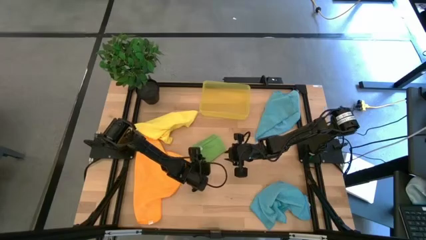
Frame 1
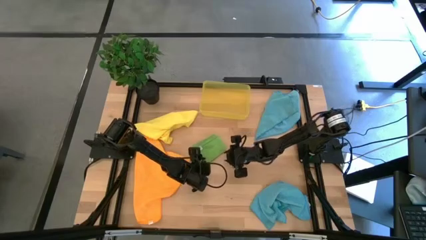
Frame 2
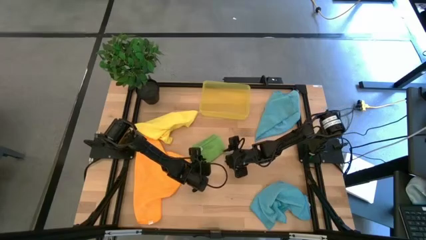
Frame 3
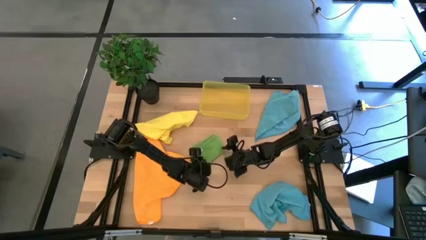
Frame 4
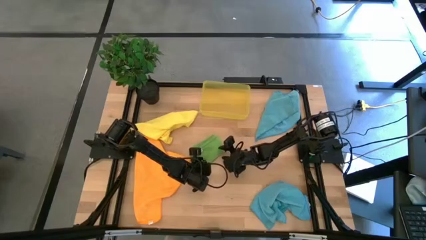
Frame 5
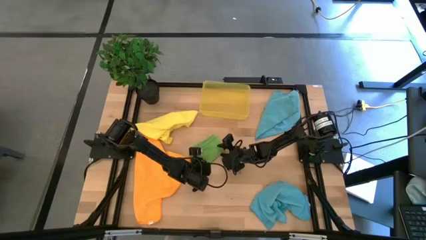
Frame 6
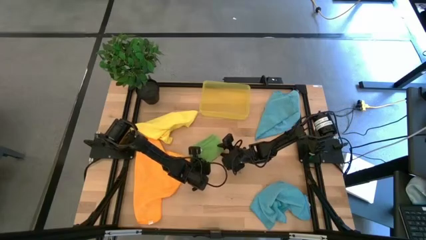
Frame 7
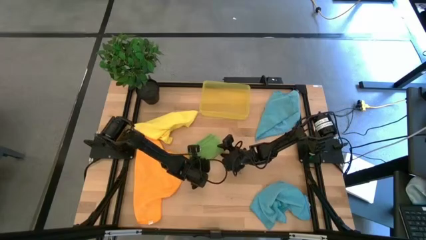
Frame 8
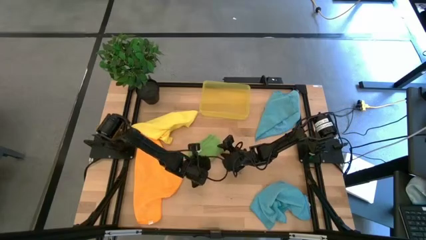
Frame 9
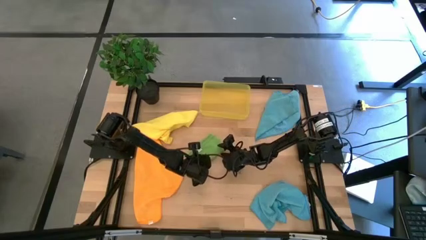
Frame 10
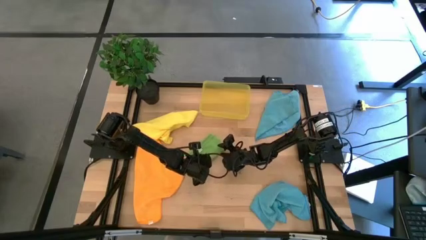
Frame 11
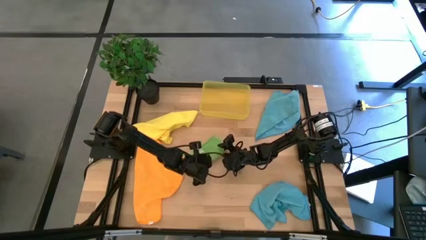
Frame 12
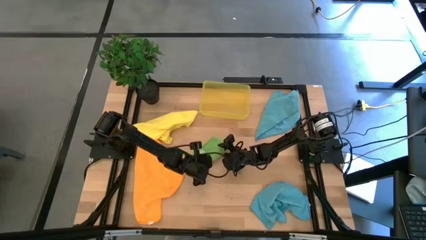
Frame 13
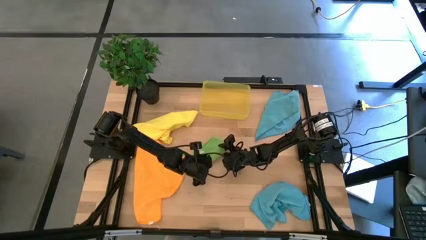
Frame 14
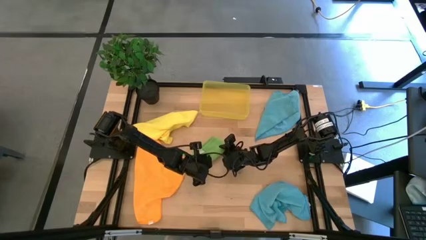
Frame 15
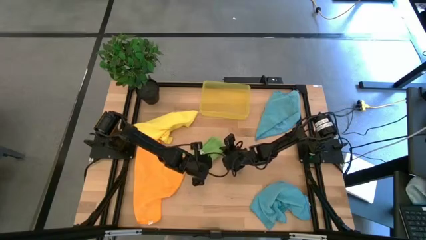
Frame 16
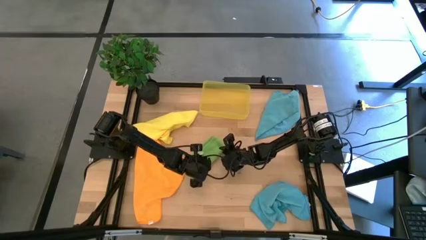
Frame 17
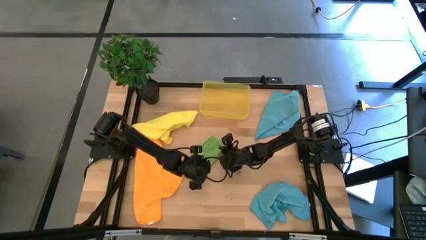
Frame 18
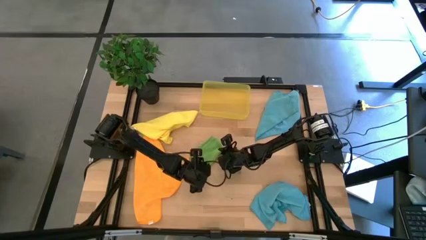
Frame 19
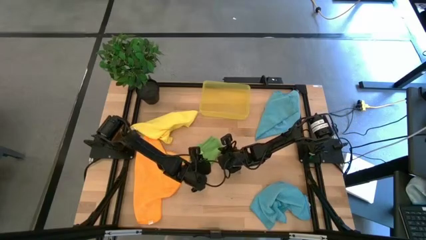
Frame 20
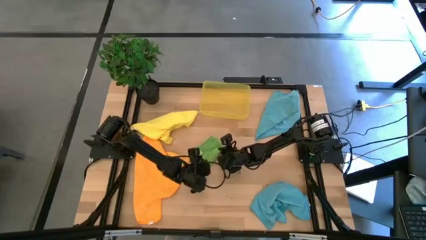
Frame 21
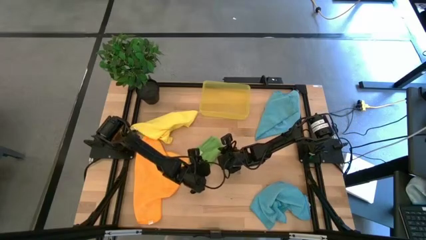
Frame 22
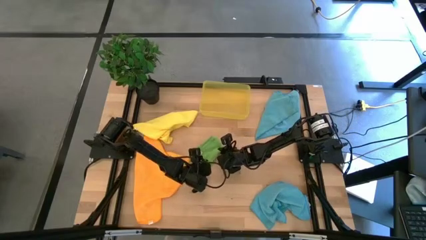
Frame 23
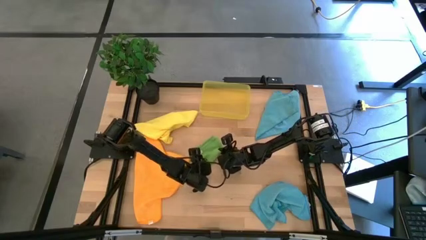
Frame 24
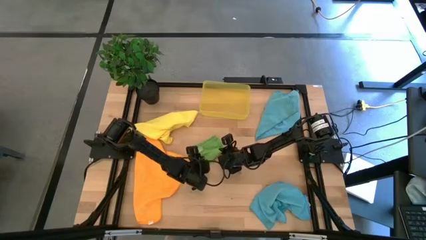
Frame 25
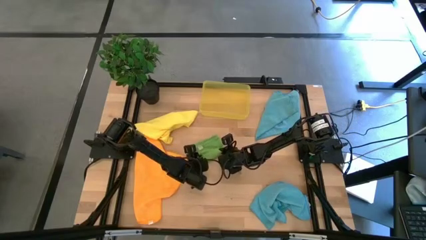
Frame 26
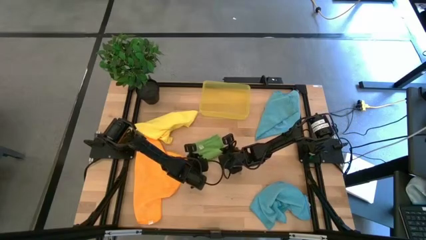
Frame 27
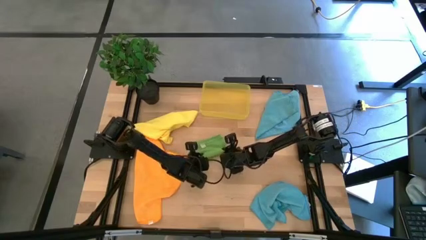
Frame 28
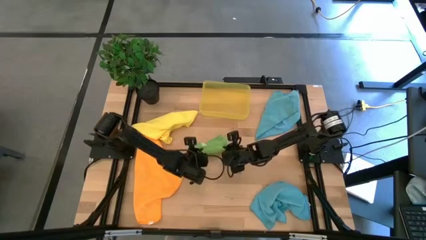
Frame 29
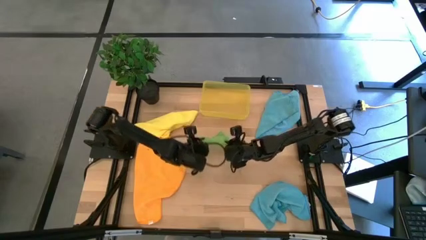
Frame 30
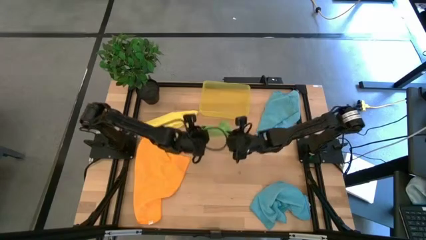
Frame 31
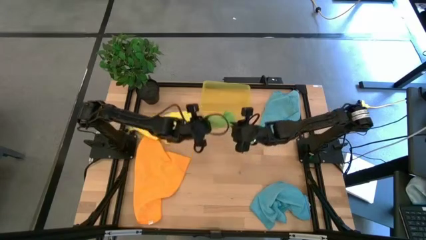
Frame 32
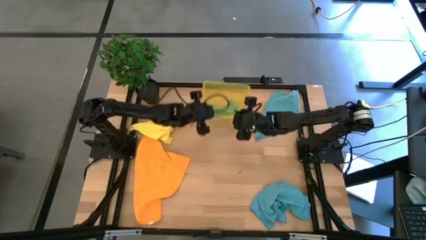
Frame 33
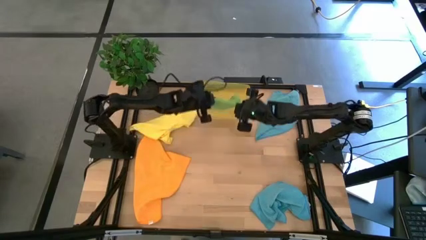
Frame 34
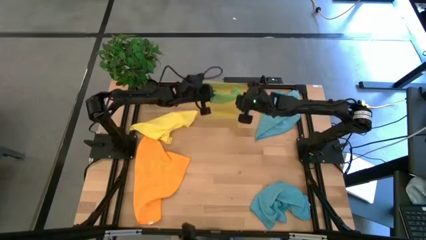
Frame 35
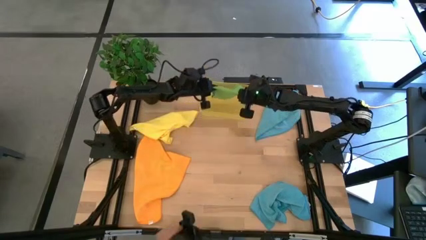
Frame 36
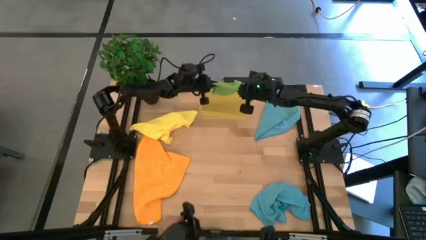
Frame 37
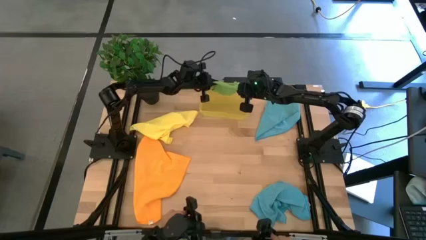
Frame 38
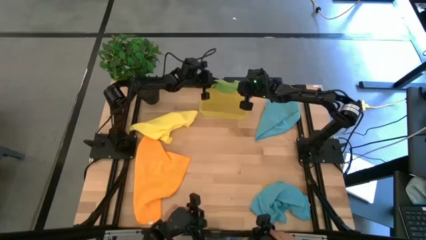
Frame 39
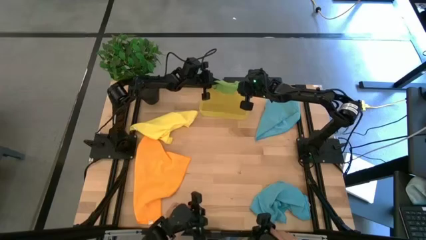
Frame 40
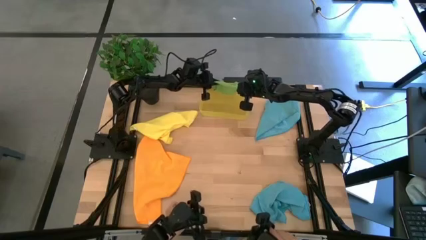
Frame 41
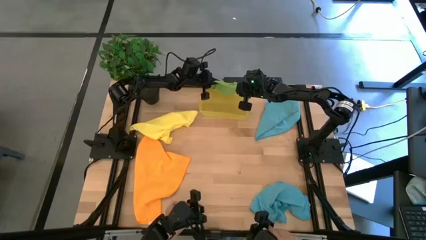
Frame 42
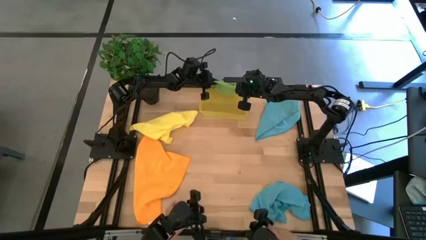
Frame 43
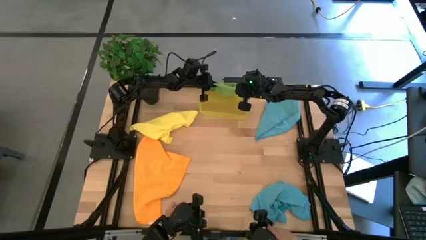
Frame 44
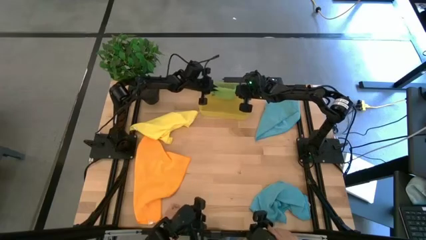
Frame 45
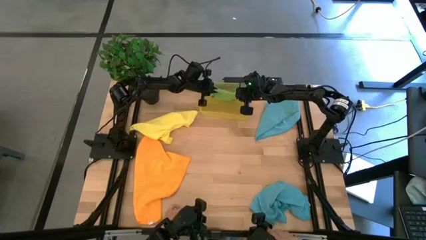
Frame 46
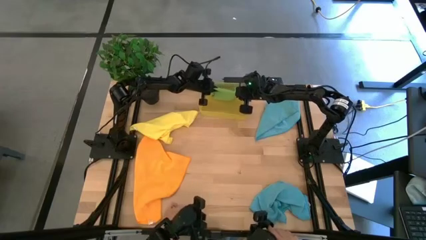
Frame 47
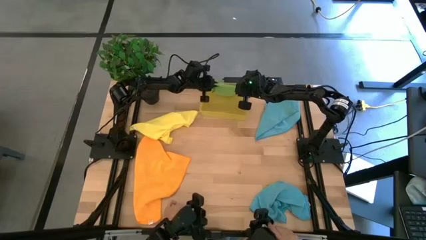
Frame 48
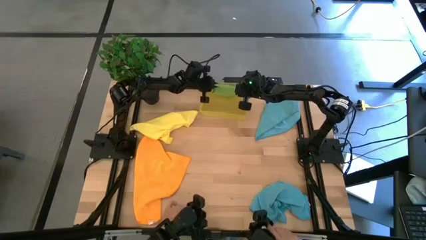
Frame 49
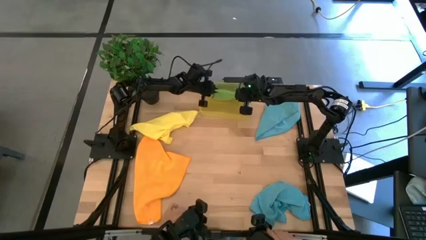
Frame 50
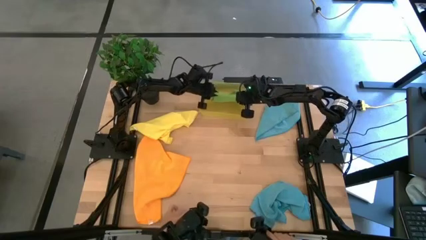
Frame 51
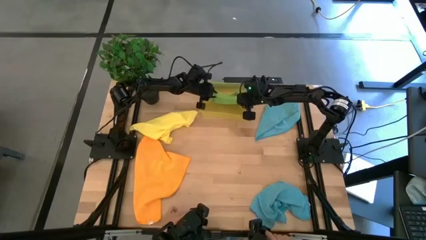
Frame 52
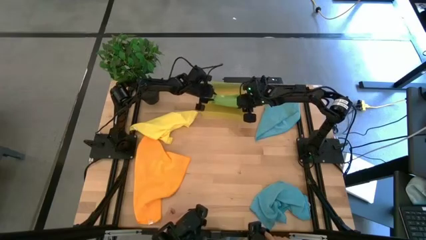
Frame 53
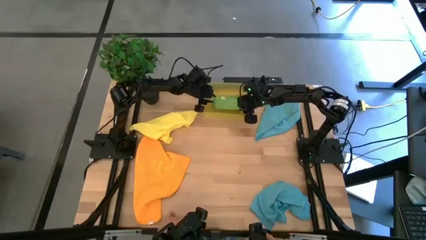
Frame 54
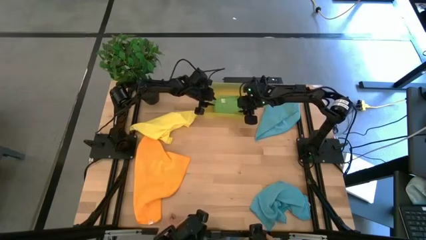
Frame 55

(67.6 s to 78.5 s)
Task: Fold microfiber towels
Put the green microfiber cloth into the yellow bin
